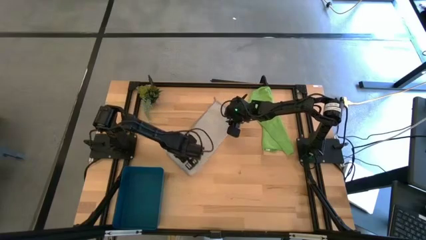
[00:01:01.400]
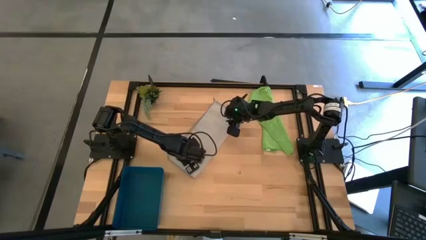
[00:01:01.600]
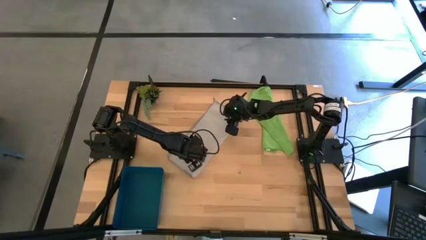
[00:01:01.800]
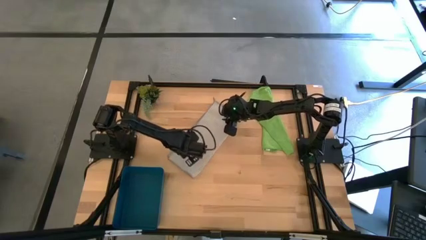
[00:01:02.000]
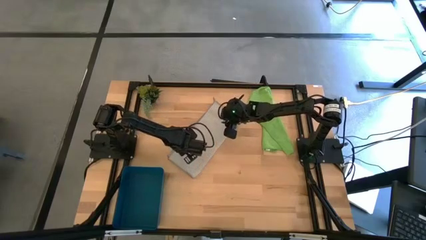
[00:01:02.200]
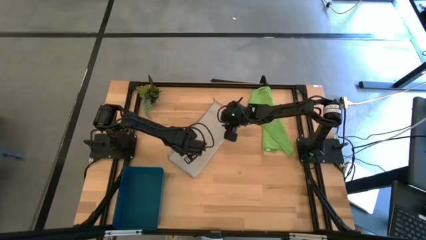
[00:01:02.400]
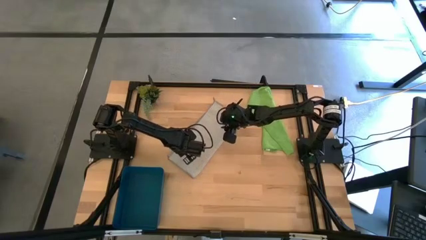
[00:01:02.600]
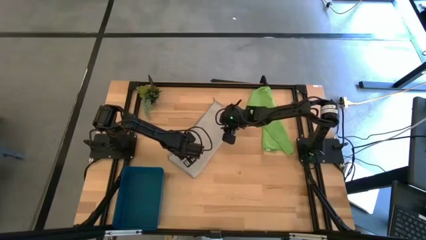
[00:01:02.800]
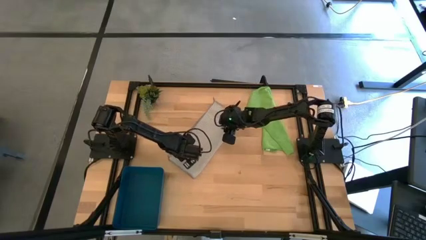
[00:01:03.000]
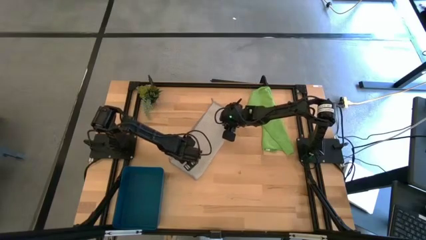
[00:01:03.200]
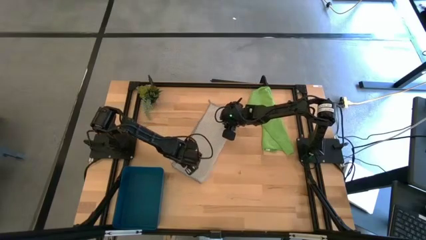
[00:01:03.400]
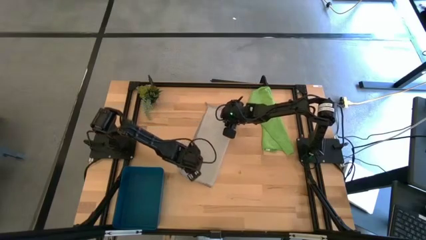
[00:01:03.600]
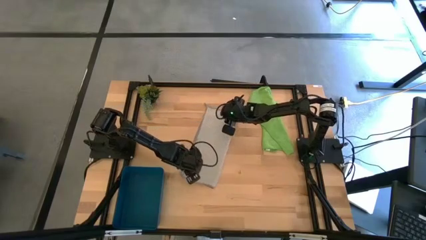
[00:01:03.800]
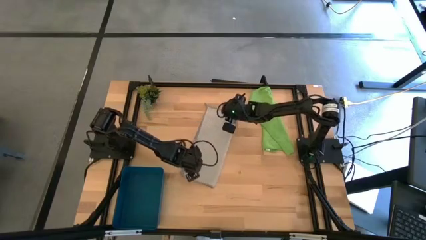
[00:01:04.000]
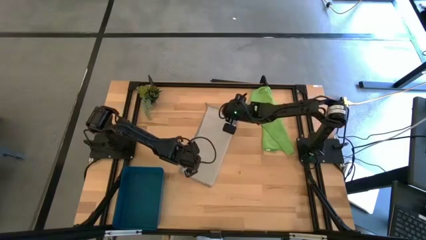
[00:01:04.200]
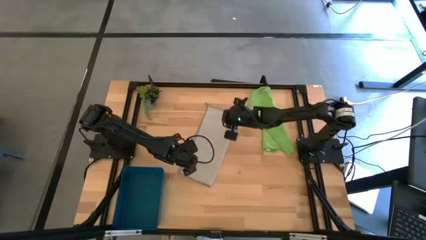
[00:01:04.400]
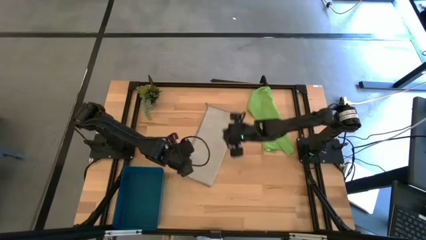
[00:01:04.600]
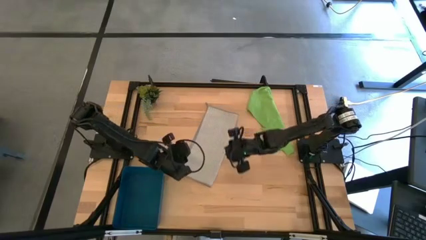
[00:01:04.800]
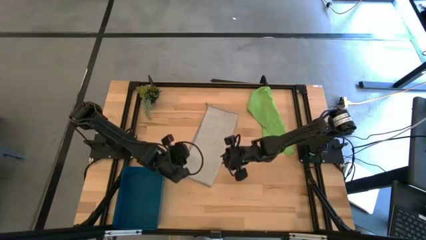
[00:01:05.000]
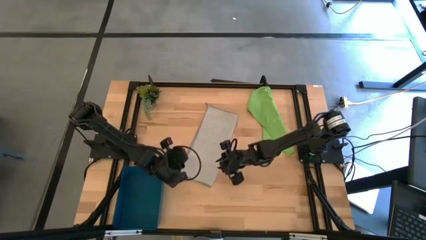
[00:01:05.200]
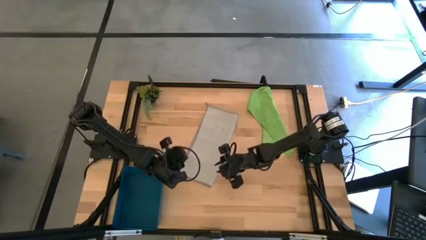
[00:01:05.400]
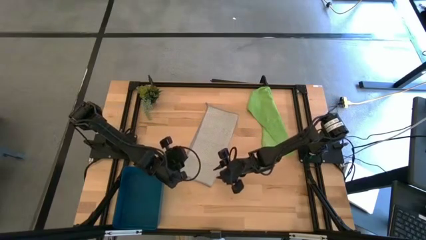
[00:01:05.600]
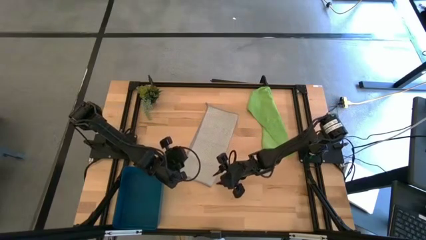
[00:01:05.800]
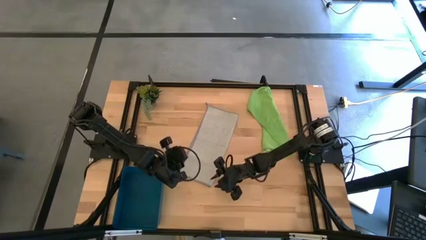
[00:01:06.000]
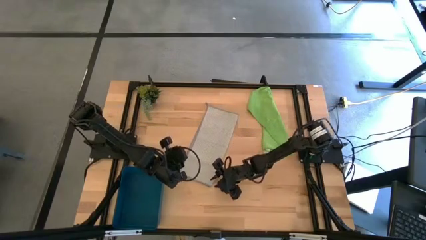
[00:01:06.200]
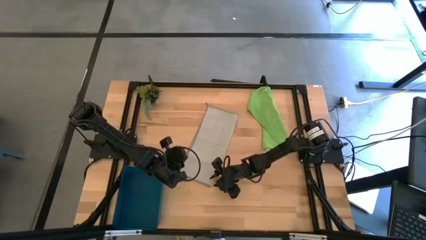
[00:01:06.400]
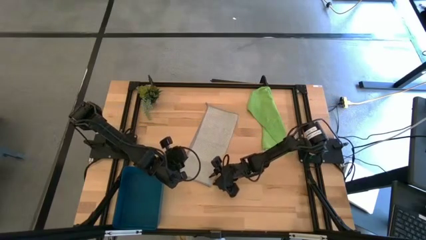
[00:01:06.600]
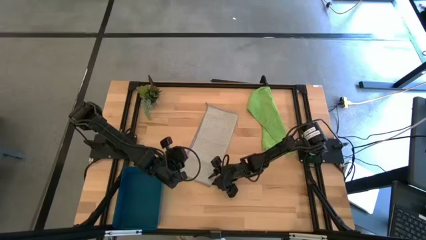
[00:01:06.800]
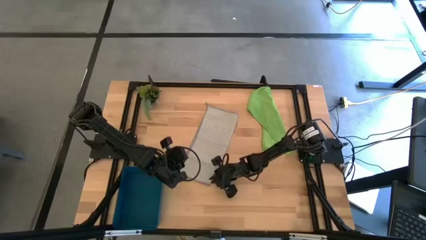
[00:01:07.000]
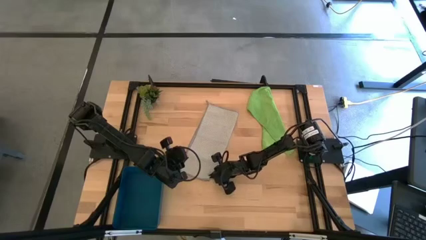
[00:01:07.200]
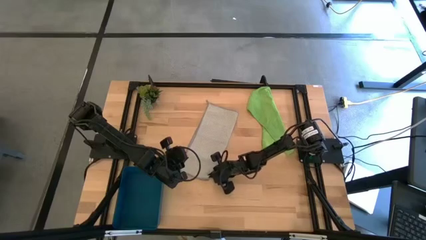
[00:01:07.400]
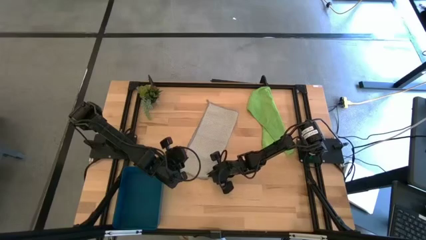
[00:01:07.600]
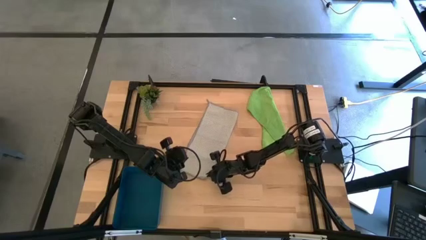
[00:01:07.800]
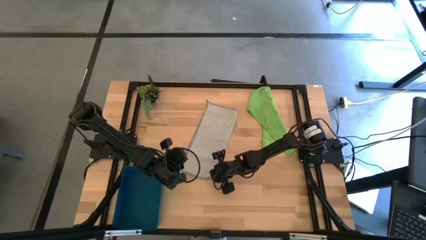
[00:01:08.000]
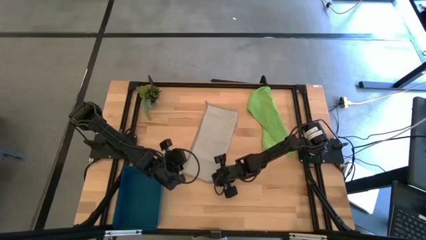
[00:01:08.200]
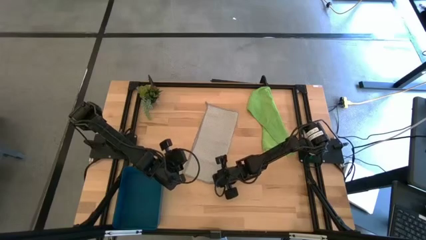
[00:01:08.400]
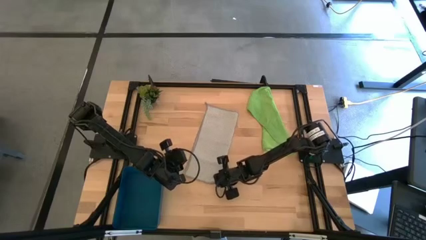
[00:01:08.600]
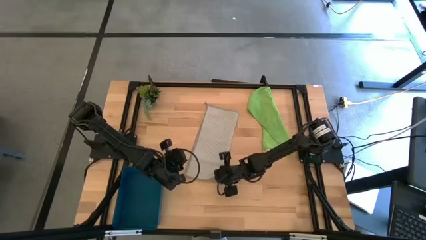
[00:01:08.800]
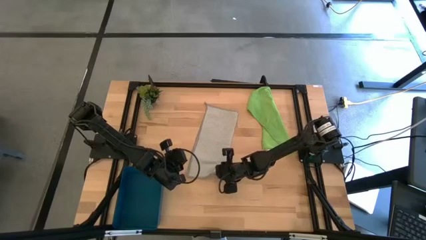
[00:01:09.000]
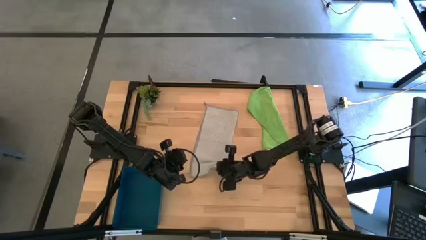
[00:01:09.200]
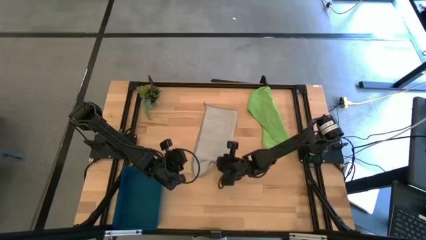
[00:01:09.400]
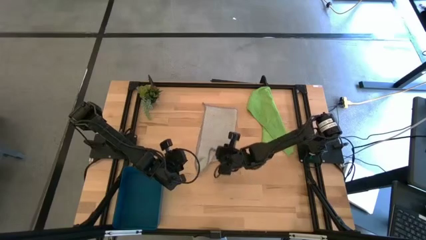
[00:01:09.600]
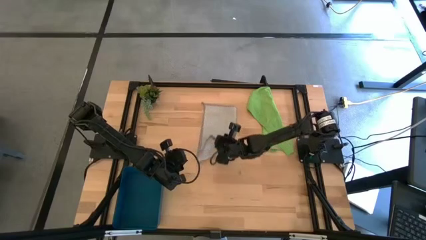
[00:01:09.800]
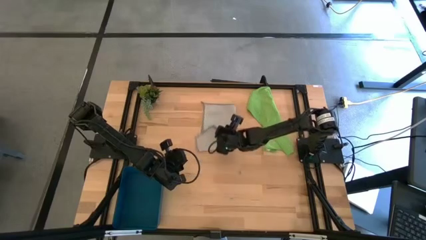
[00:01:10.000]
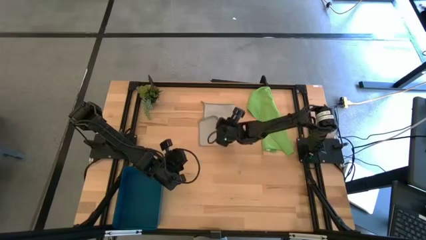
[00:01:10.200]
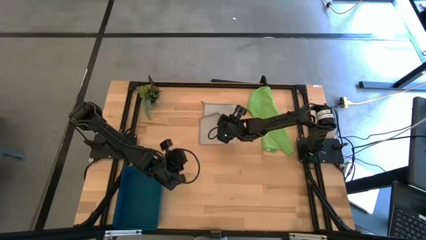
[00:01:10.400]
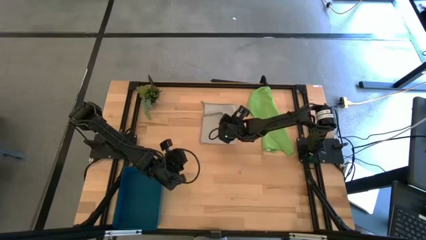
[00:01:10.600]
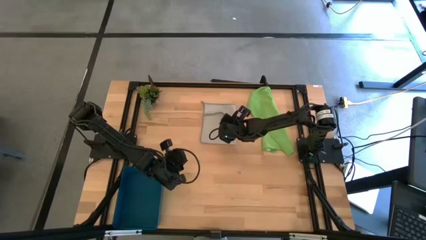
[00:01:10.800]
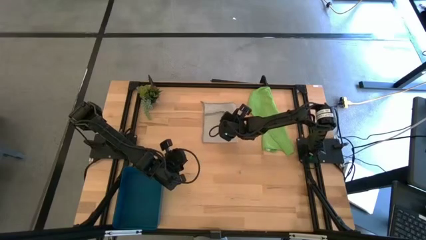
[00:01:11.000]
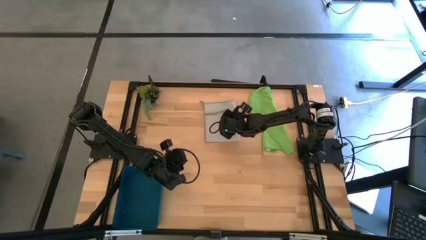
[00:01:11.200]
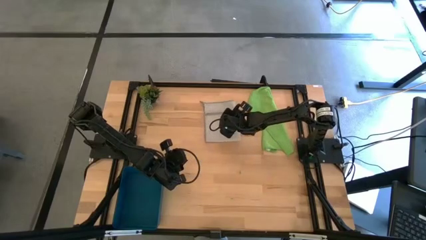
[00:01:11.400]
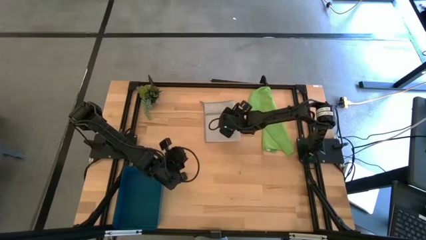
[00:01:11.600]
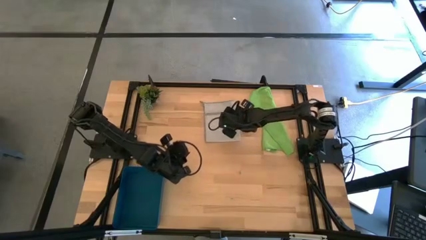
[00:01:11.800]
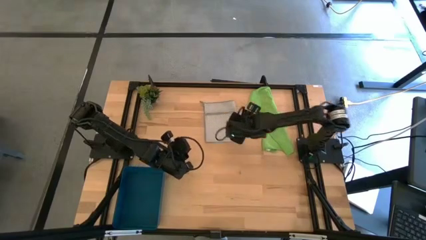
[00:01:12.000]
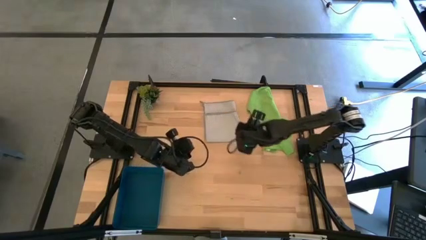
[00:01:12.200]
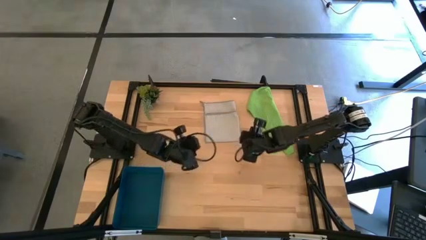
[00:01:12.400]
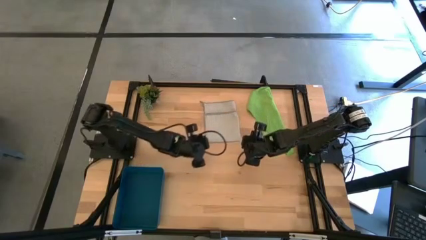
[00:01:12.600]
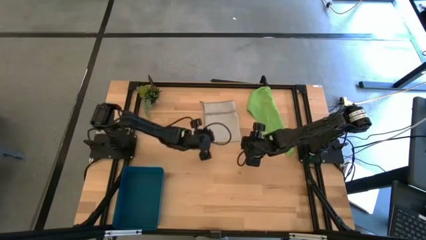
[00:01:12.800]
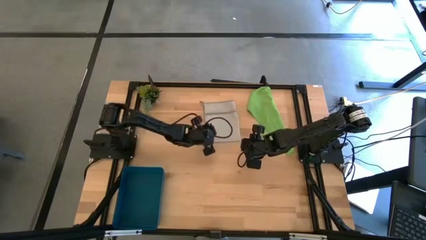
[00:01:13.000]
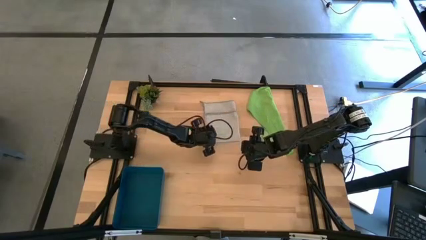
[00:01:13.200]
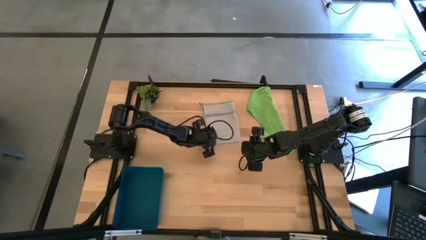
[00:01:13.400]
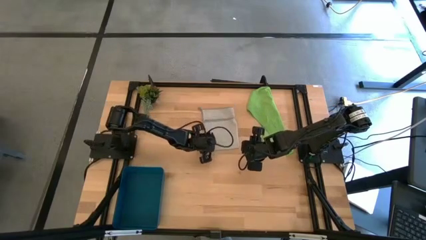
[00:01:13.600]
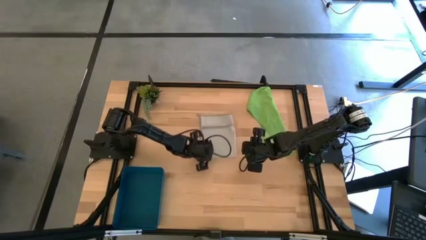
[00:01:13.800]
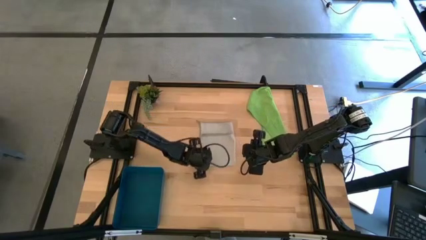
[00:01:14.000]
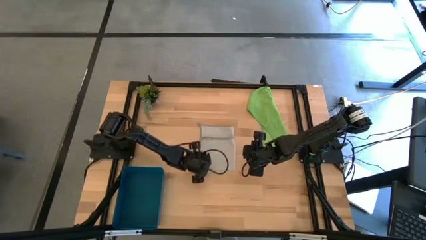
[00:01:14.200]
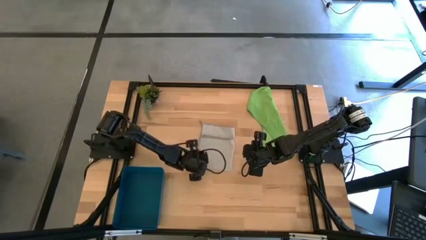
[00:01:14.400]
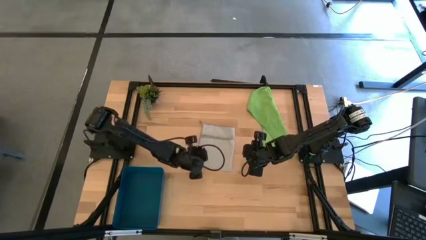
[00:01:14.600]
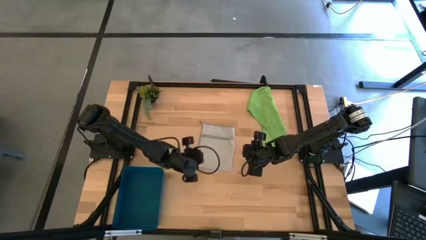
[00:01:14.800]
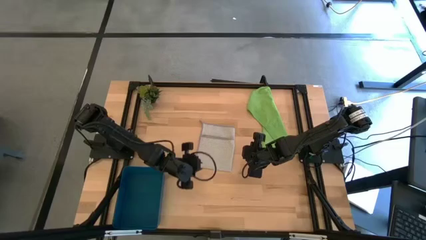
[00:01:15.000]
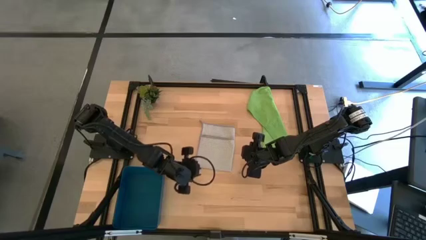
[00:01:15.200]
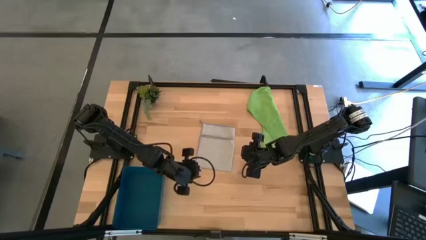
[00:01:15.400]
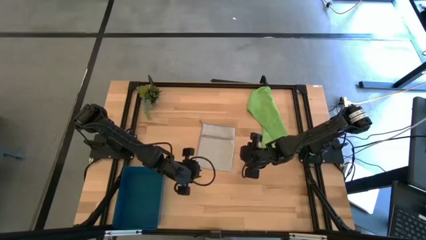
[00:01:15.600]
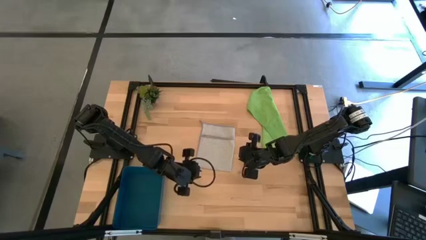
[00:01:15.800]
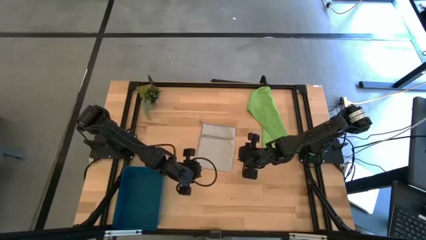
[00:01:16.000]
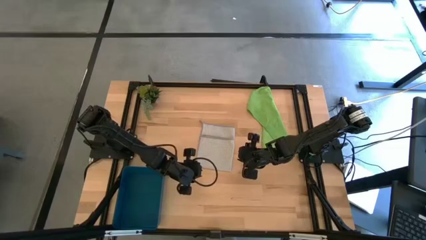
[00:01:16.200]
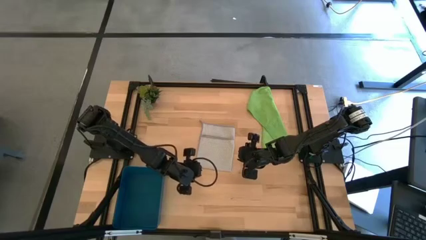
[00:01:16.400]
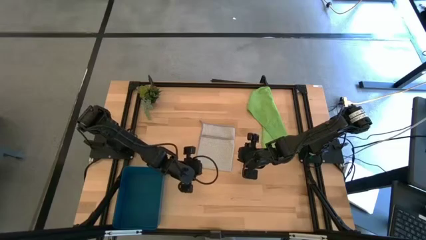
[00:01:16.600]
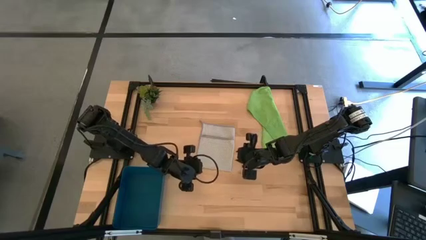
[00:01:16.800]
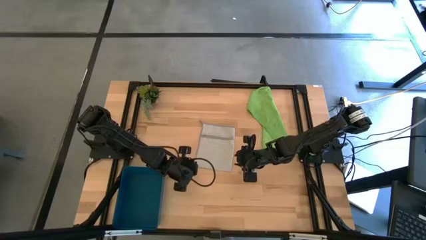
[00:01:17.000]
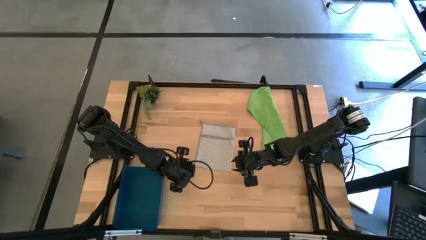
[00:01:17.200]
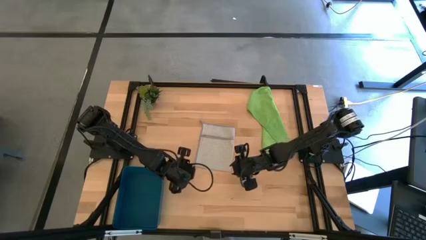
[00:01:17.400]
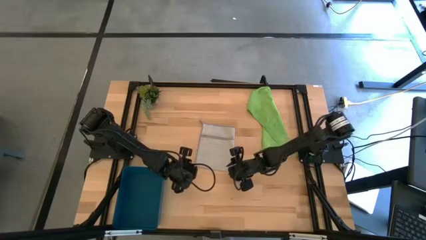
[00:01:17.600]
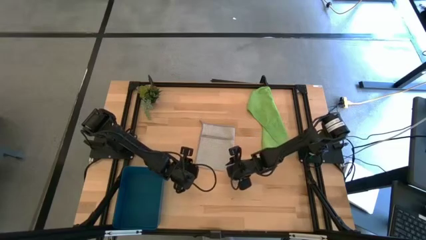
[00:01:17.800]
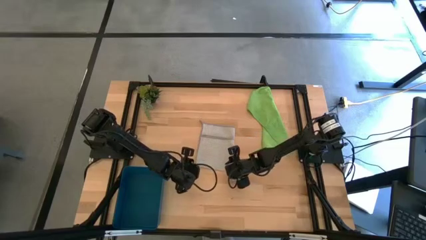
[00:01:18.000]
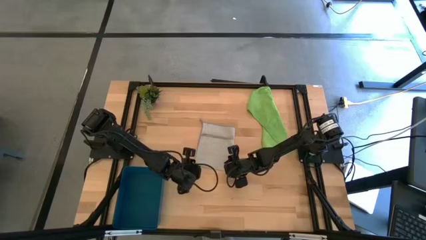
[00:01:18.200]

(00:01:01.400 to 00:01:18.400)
Task: Roll microfiber towels into tight, uniform cylinder then place into a basket
Roll the gray towel
